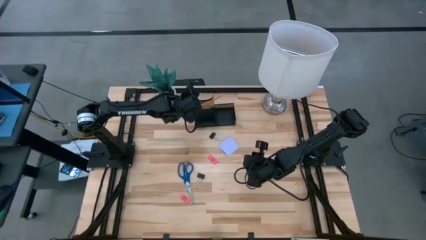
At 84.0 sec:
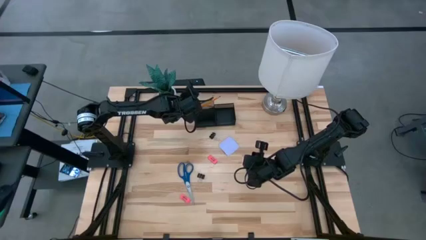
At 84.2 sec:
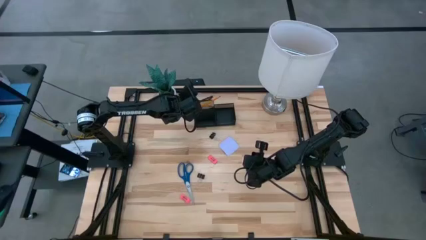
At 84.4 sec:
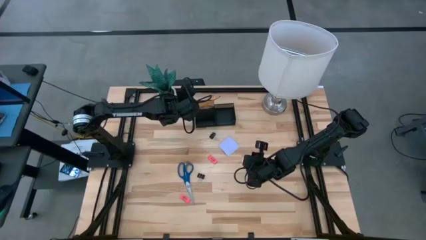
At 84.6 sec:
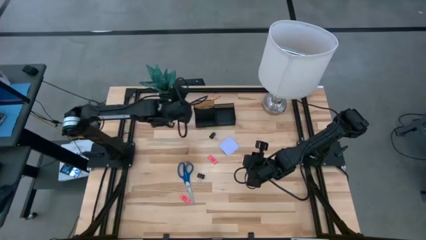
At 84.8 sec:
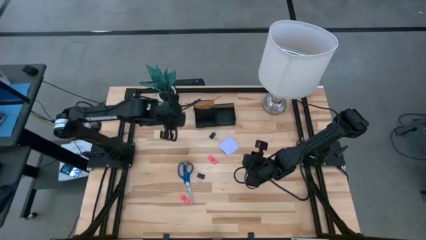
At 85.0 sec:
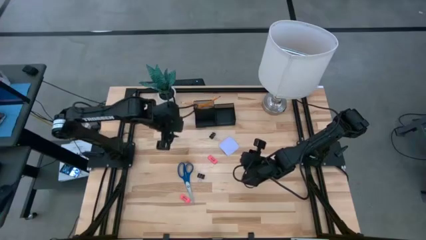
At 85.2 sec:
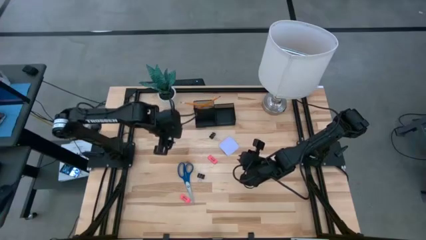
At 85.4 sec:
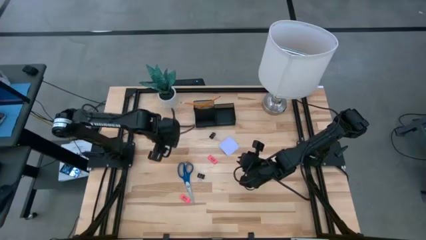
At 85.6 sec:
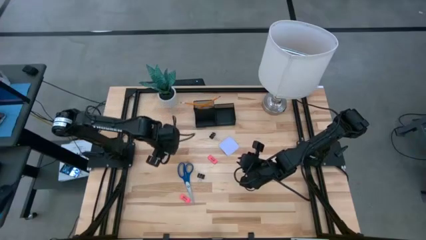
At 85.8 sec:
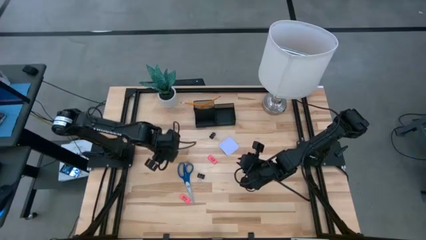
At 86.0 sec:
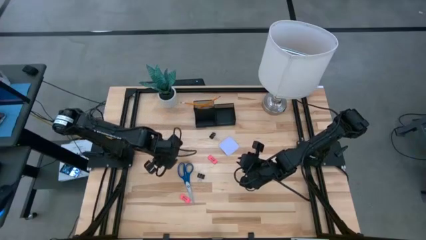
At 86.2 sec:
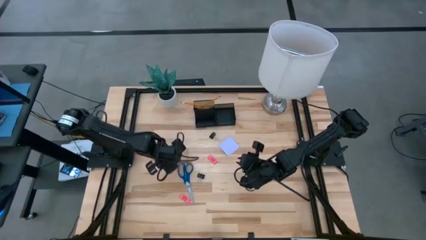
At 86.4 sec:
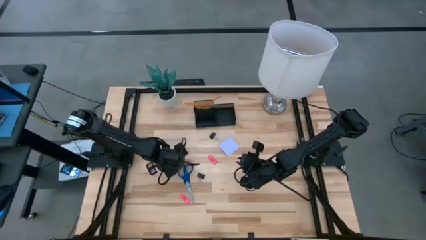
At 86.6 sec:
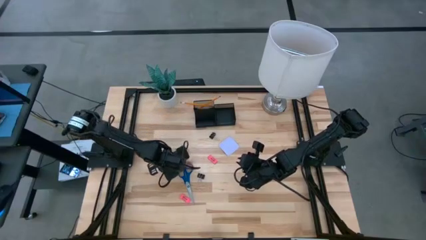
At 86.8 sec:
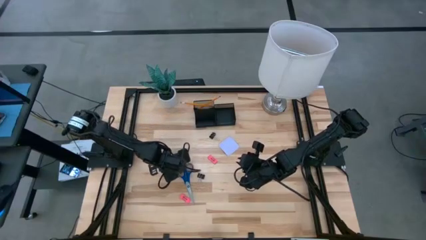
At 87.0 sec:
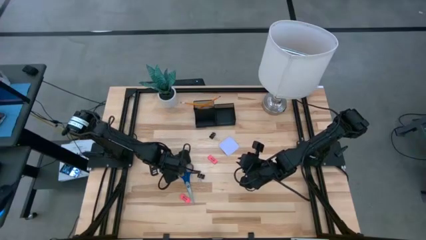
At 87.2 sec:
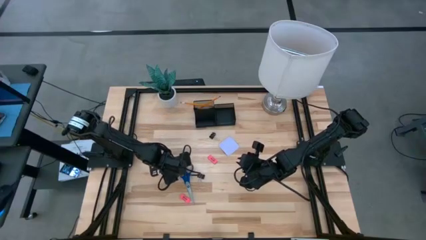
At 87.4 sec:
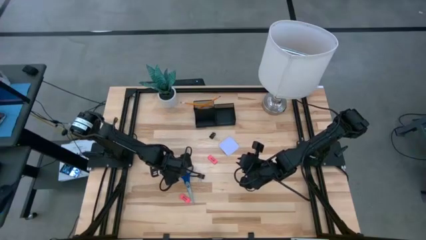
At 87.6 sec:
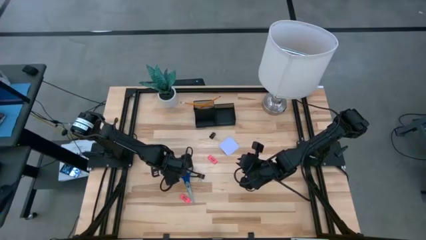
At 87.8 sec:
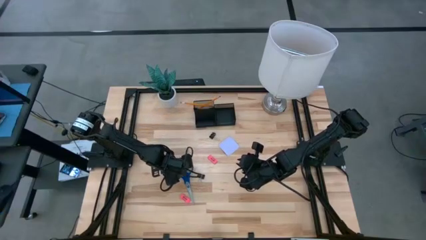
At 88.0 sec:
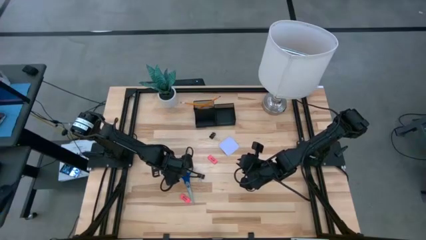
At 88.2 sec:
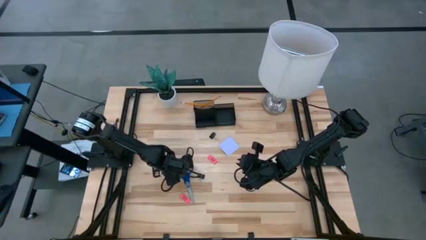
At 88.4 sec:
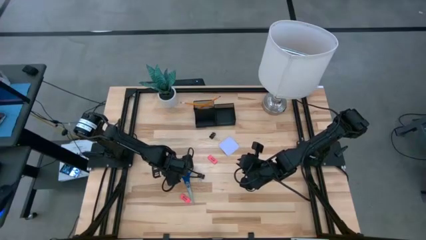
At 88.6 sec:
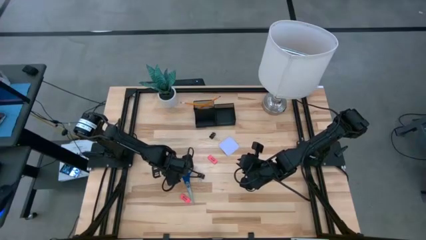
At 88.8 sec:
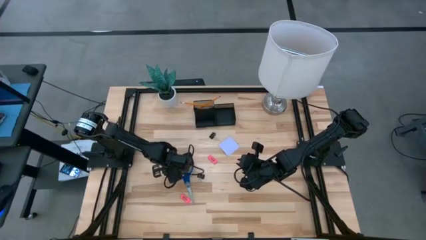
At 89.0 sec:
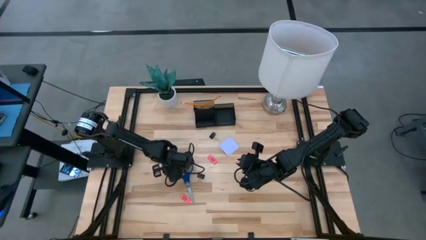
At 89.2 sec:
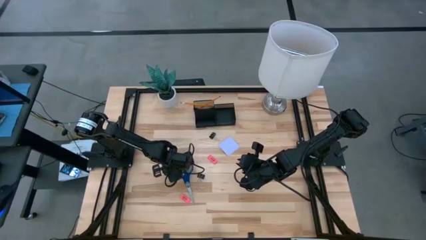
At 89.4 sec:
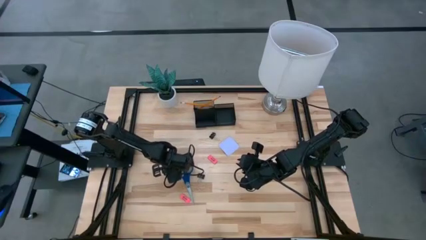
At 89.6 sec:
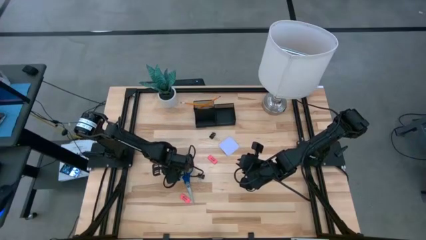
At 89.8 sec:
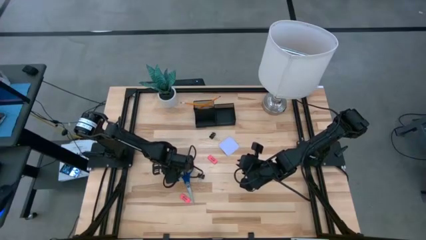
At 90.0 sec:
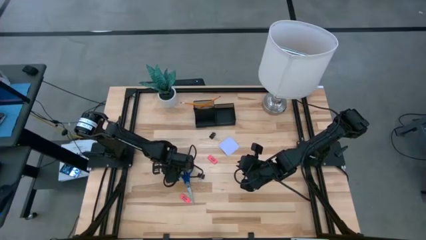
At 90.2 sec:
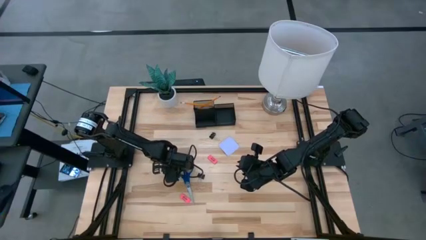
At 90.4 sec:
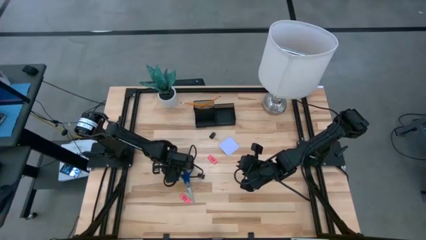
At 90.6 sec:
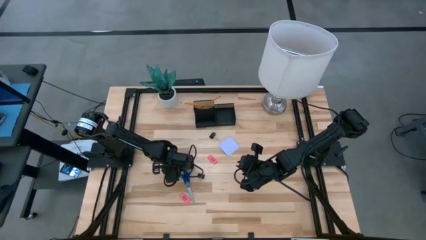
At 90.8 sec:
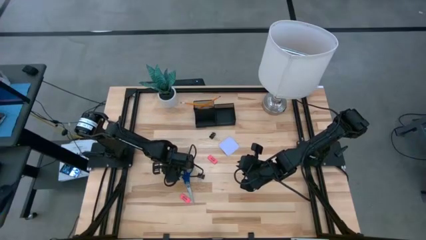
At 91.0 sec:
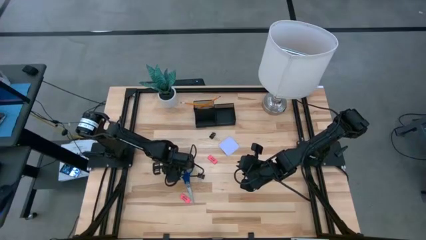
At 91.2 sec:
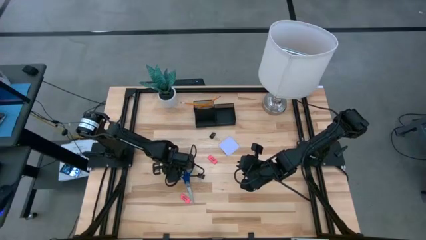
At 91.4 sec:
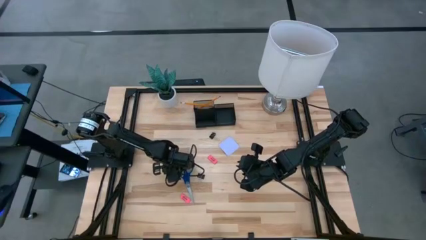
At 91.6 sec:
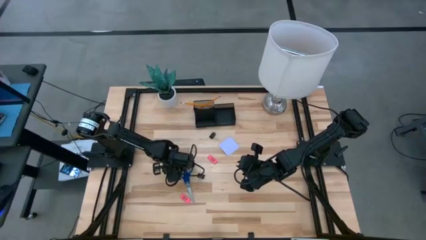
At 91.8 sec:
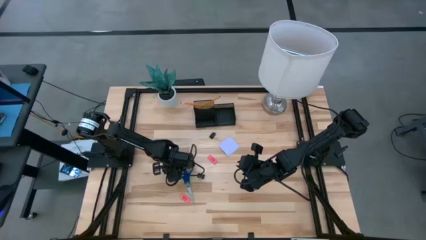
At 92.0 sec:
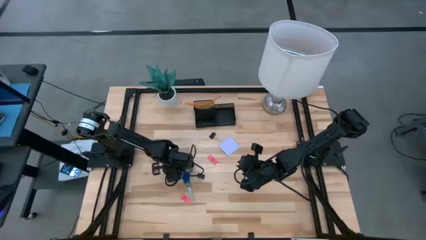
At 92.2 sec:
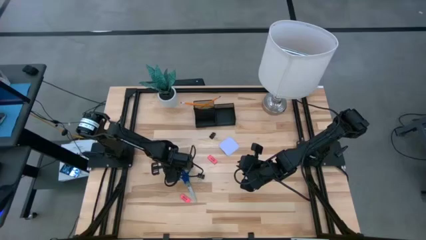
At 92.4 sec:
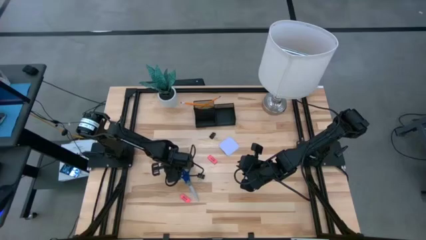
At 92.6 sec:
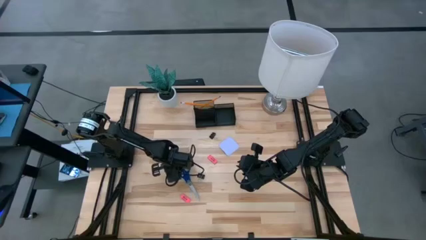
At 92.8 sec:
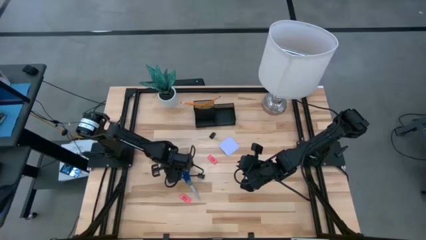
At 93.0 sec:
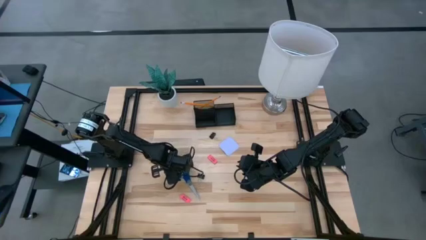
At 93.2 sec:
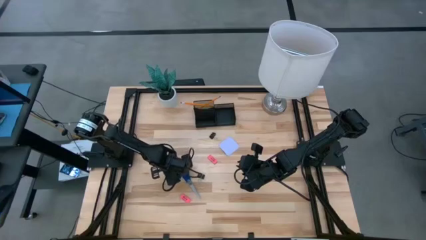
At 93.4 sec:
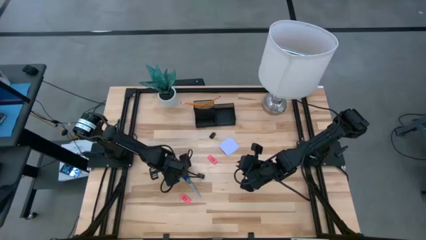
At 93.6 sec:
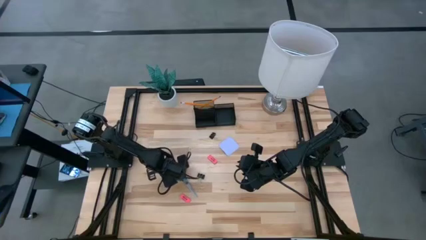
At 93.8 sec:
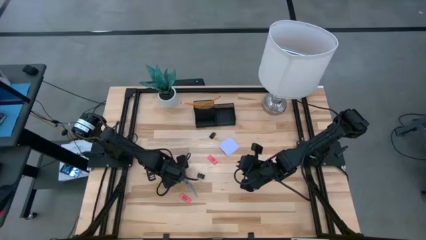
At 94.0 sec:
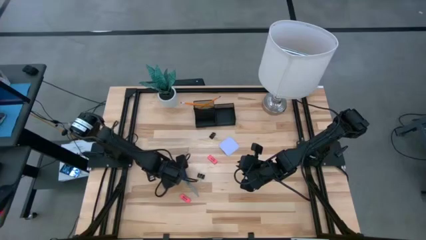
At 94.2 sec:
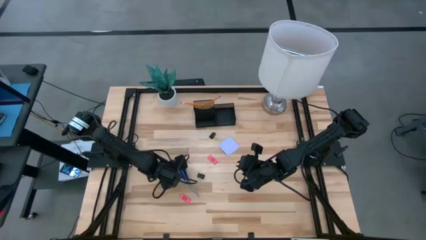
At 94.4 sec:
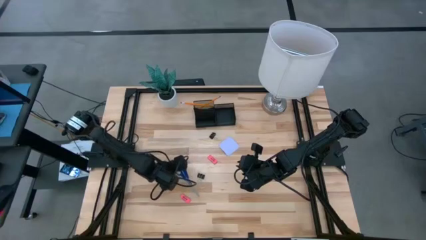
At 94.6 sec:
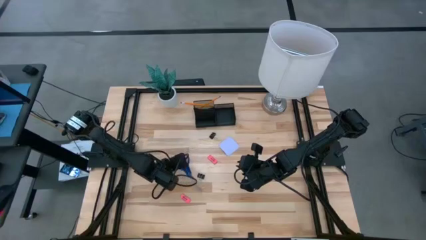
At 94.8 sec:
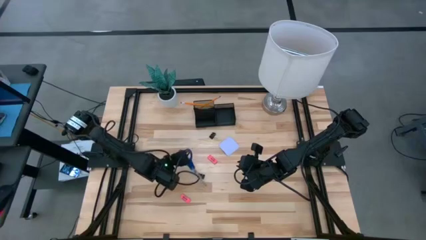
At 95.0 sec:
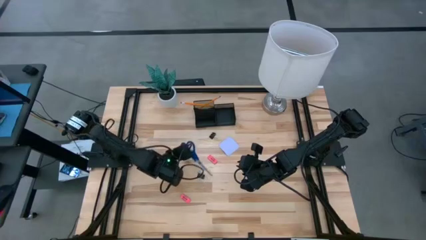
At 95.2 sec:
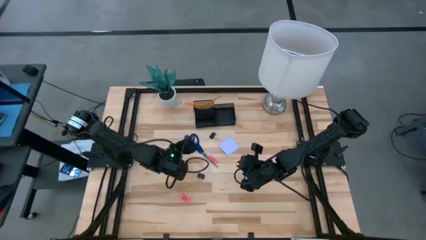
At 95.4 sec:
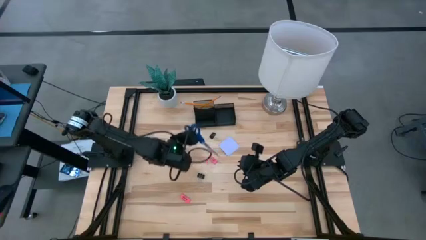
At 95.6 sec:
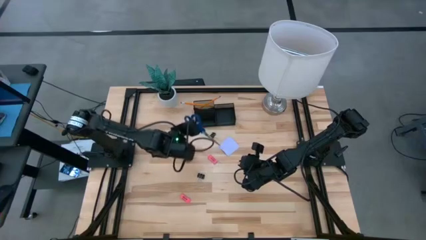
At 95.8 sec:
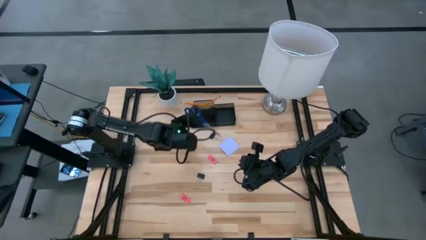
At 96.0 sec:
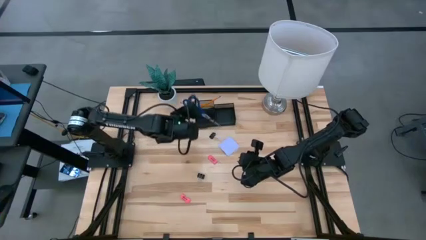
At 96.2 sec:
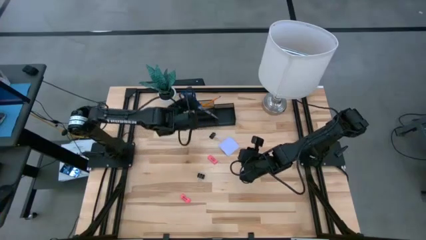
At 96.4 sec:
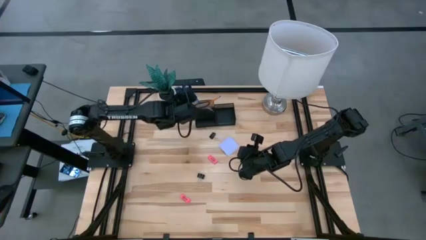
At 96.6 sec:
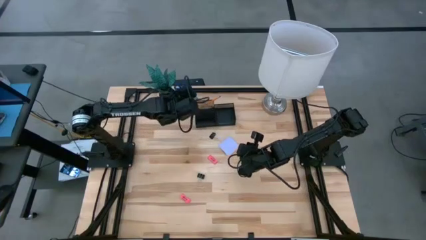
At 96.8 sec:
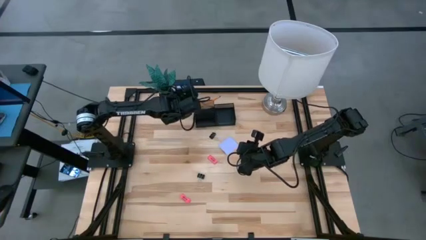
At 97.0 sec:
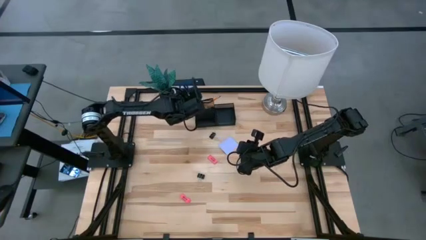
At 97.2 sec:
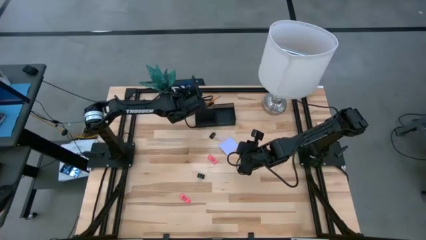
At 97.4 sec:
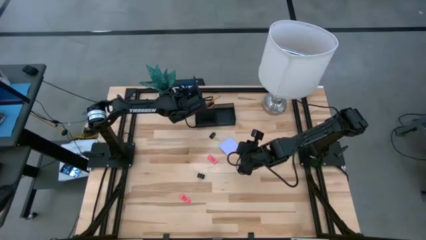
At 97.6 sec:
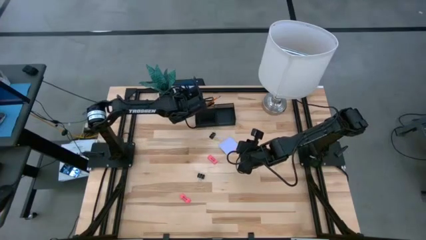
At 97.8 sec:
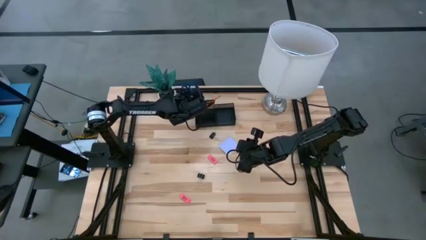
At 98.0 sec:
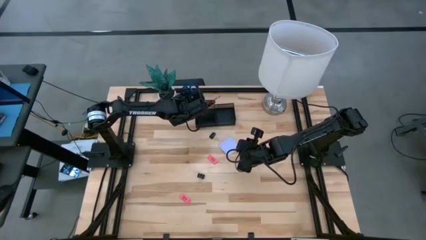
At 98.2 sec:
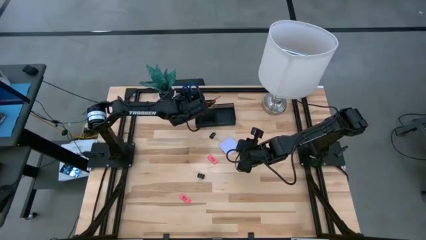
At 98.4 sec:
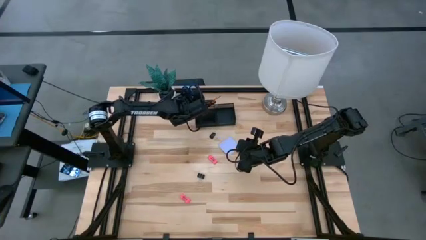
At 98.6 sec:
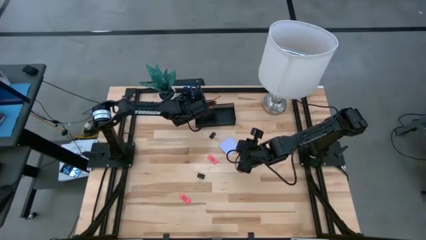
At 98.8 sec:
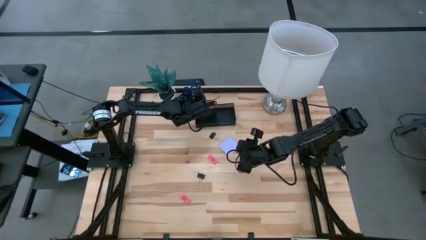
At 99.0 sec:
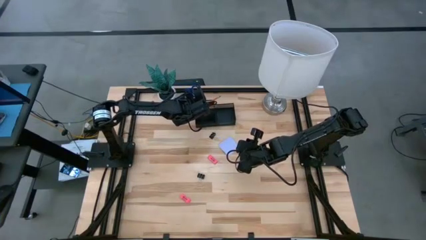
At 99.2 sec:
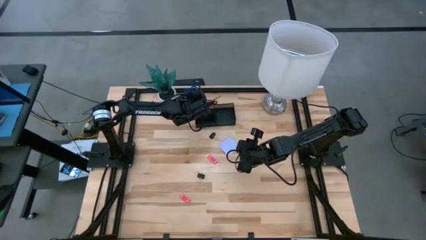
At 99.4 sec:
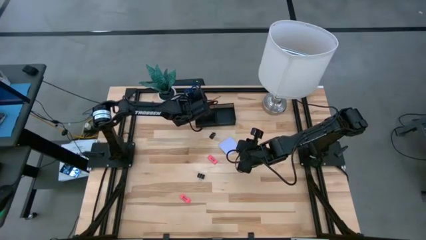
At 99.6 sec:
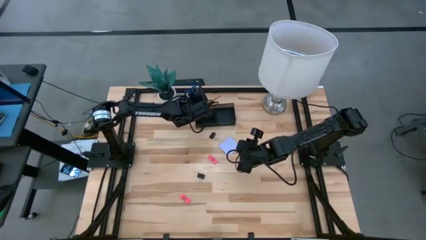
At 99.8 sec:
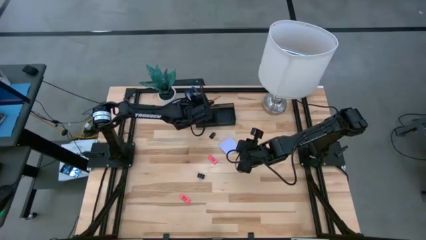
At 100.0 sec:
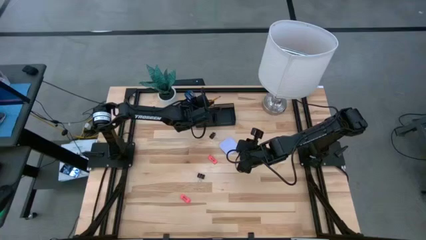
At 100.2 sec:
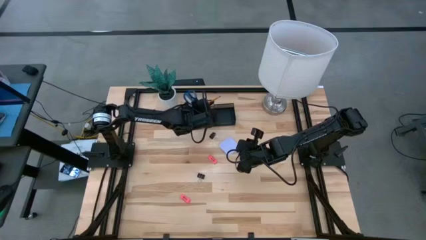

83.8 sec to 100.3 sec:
Task: Pick and place office supplies into organizer
Put the blue scissors into the black desk organizer
